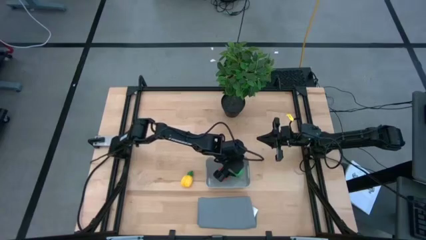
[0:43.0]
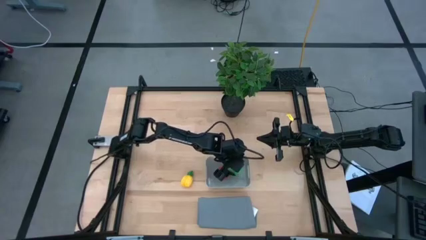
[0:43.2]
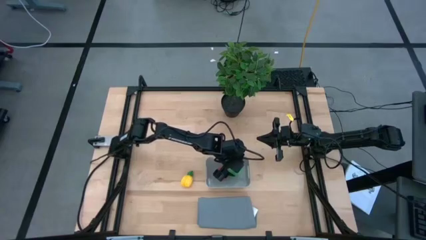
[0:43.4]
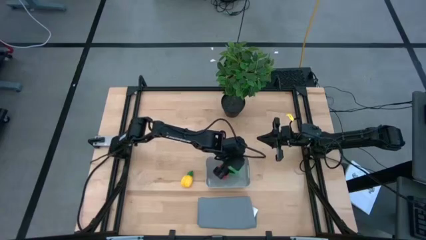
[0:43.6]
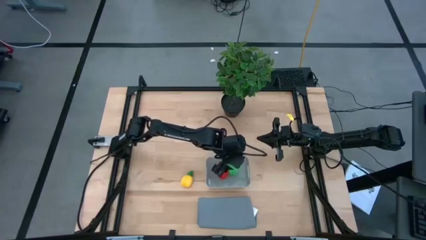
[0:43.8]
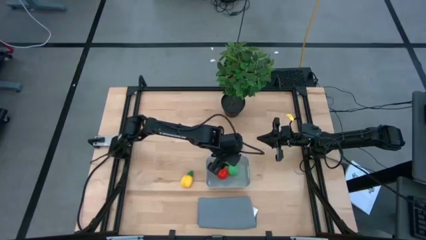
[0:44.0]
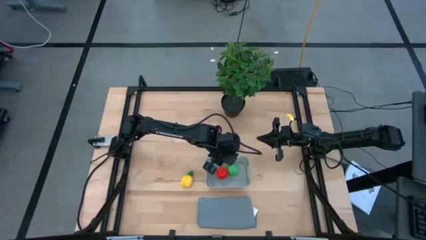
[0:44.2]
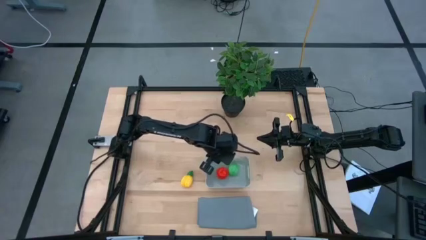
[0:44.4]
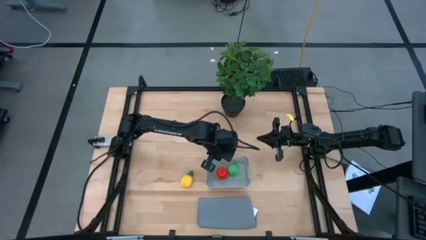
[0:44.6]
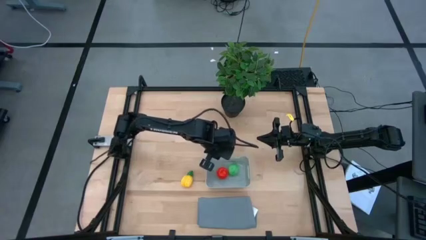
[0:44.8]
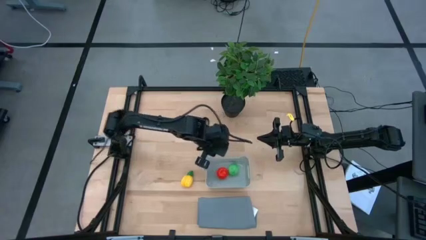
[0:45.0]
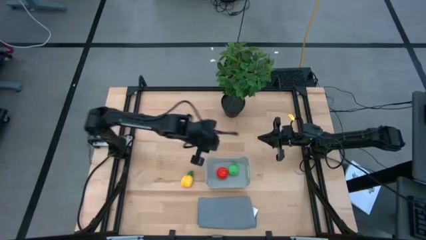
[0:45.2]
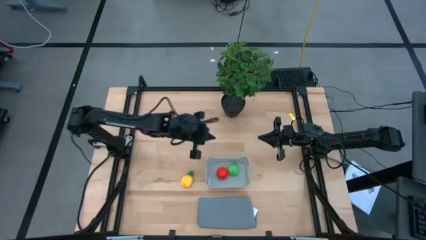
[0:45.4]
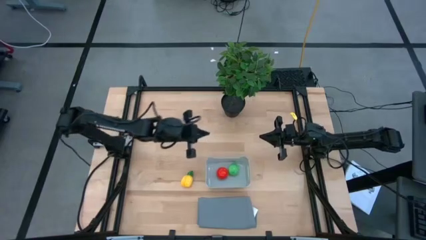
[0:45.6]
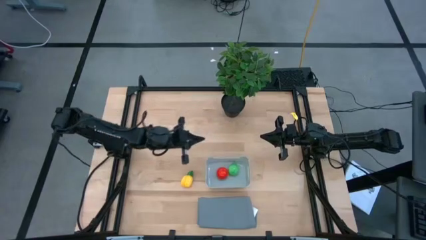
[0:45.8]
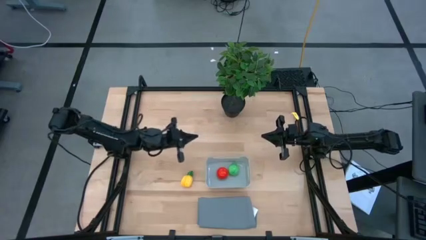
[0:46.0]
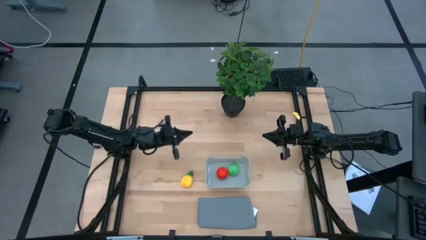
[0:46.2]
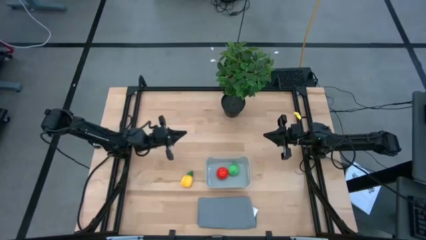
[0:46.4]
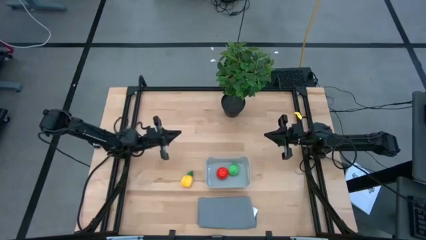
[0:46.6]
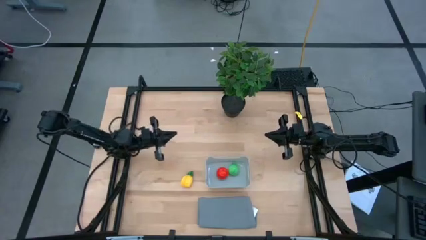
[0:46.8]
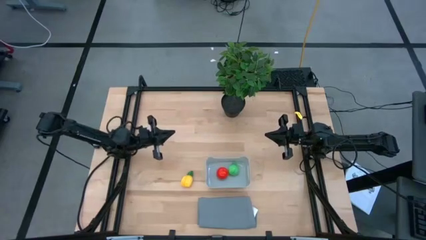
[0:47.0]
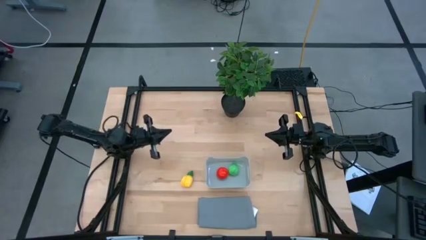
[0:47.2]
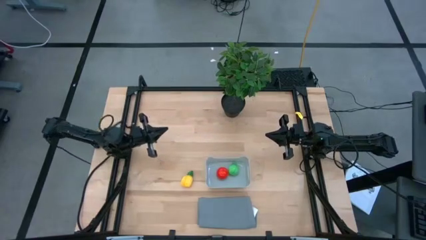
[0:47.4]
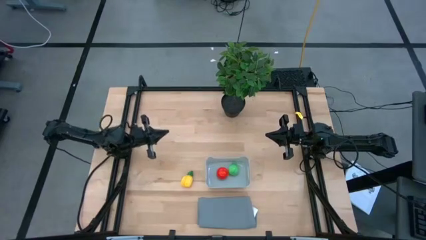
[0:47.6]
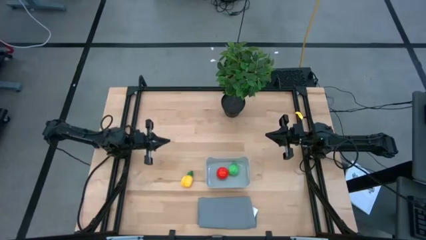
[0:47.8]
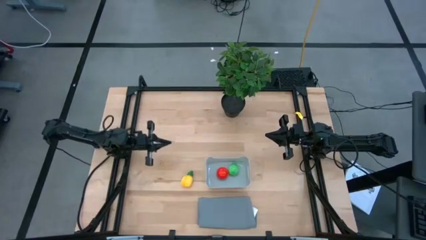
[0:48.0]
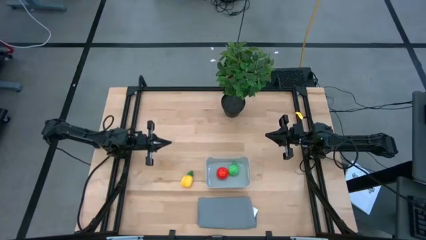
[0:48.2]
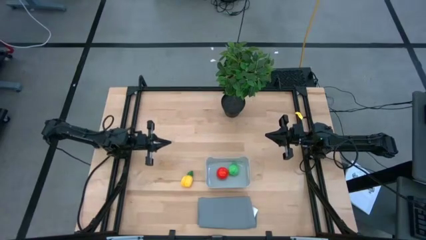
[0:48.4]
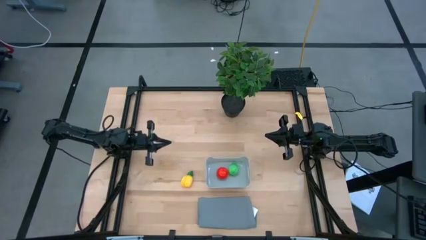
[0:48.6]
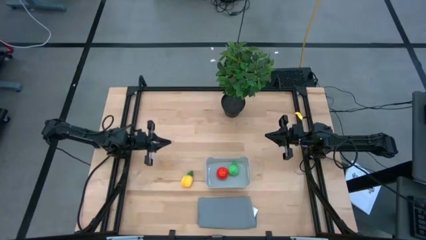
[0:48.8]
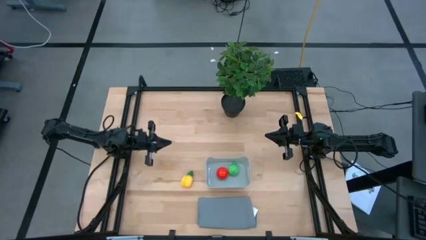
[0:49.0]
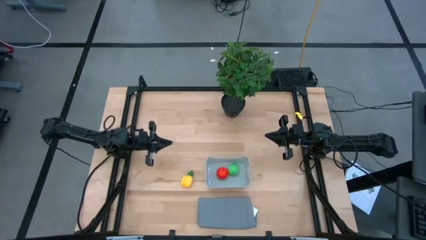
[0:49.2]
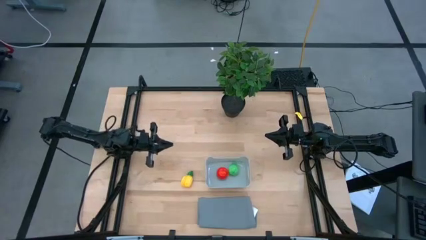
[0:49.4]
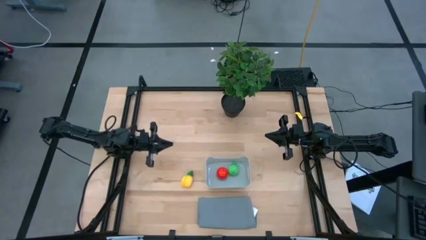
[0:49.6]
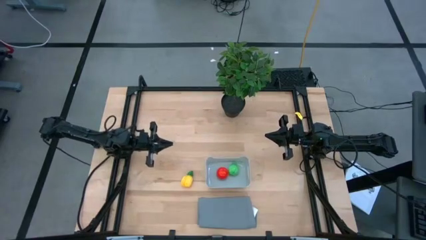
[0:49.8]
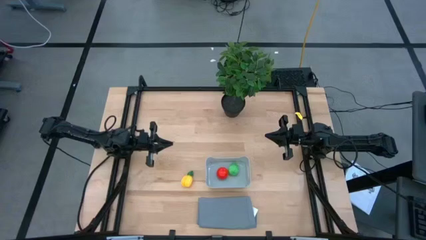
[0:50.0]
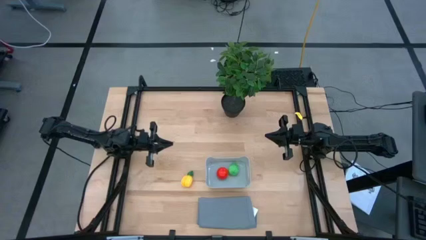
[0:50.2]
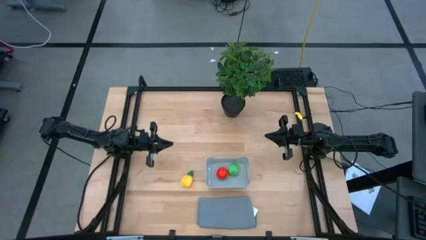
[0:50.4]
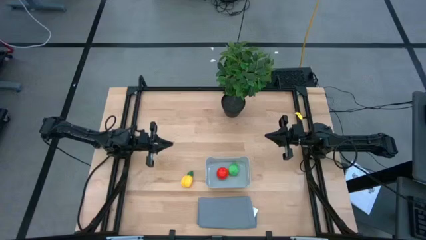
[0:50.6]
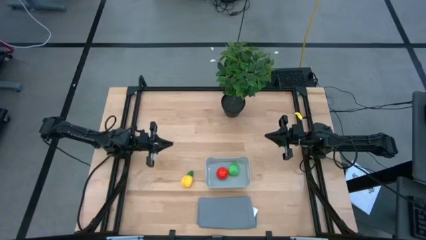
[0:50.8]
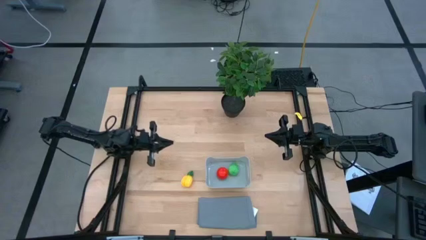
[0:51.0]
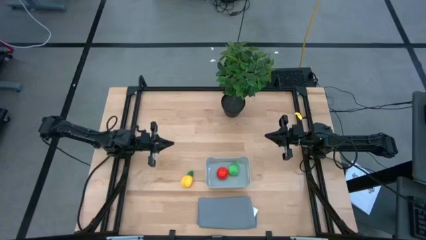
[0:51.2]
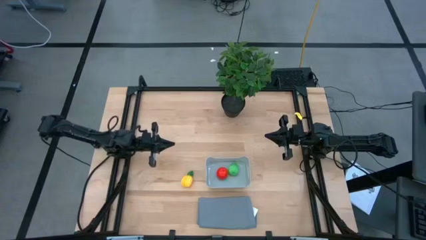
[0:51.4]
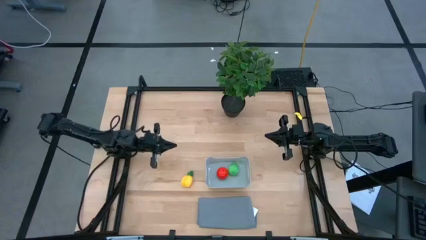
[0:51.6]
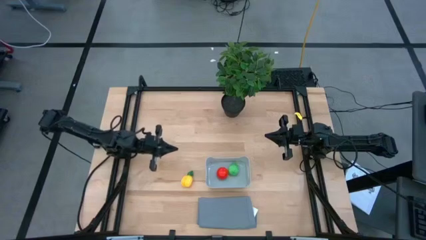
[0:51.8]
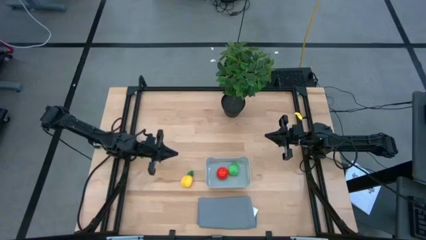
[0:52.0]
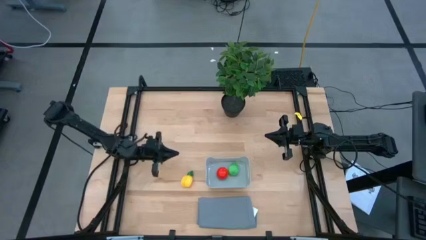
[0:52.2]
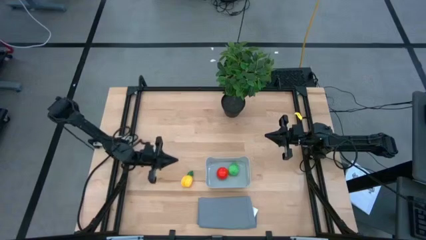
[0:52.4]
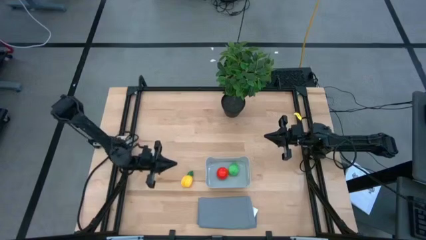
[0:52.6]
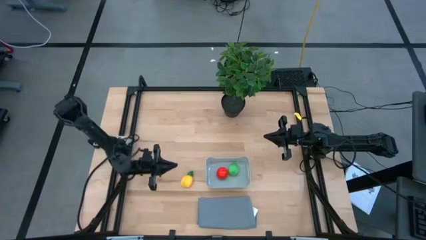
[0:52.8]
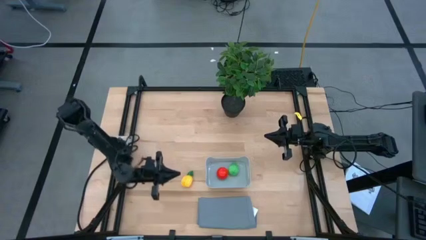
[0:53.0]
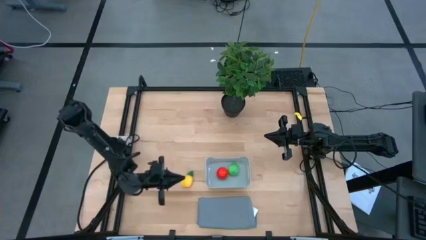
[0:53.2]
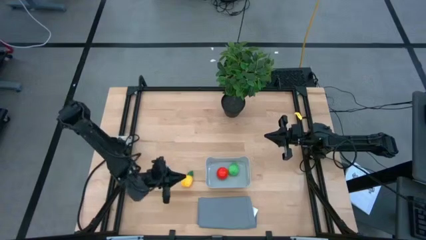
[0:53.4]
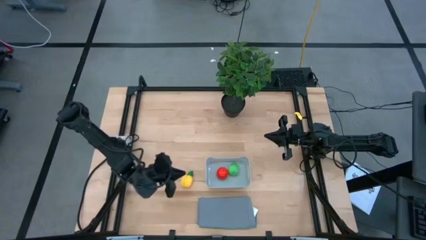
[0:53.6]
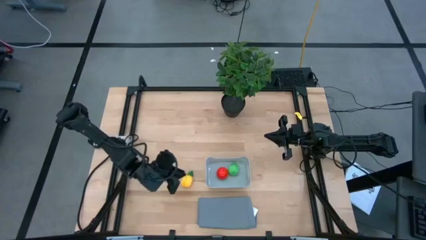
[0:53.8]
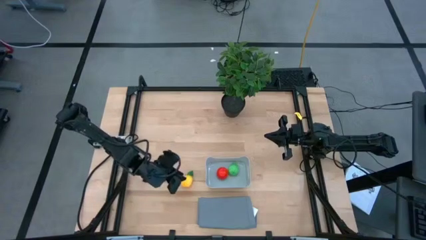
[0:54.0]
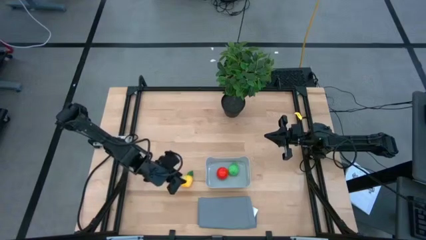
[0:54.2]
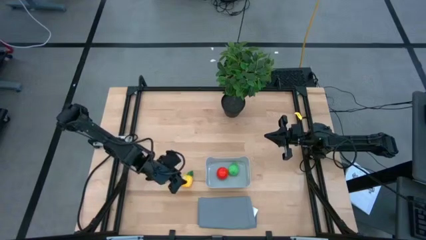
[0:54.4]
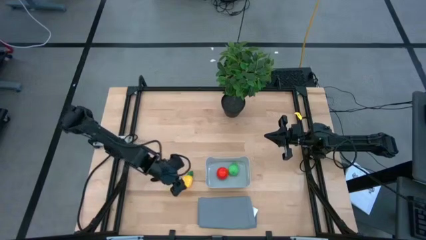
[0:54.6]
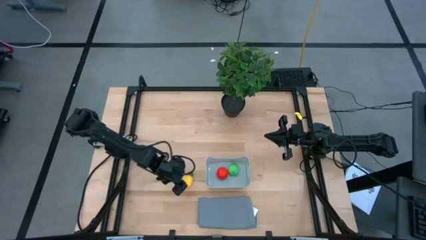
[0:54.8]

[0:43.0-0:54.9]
Task: Pick and placing Produce into tupperware
Put the pineapple into the gray bin

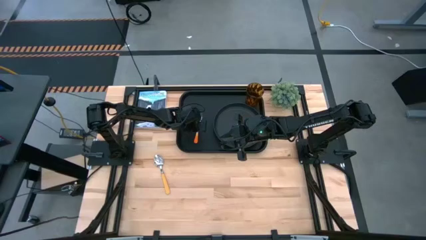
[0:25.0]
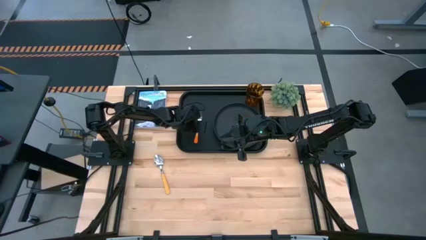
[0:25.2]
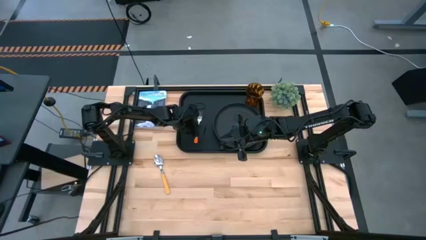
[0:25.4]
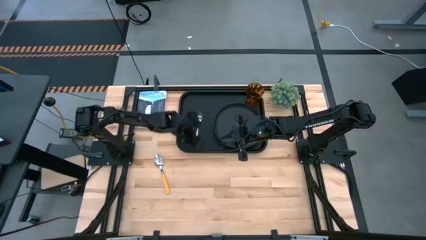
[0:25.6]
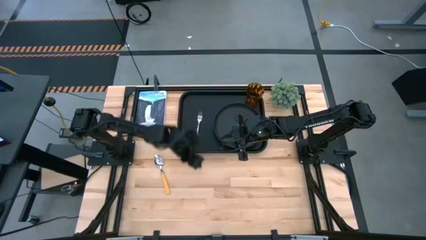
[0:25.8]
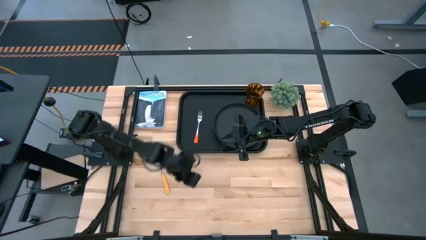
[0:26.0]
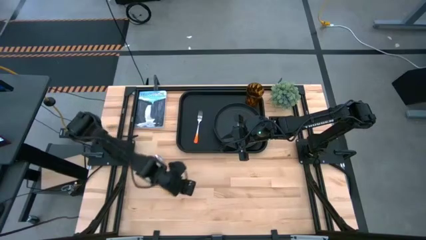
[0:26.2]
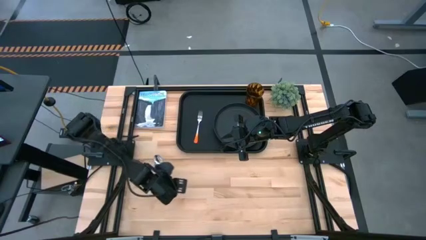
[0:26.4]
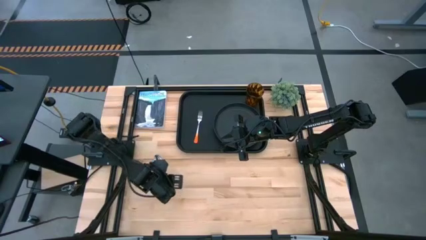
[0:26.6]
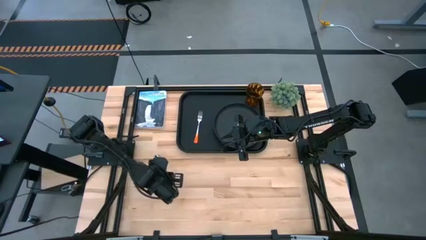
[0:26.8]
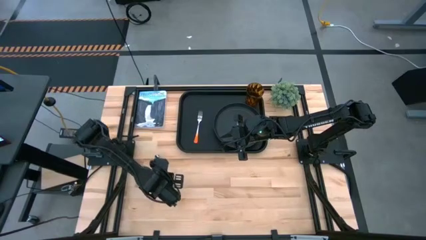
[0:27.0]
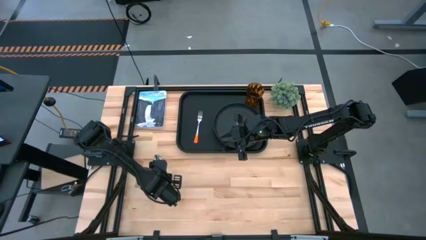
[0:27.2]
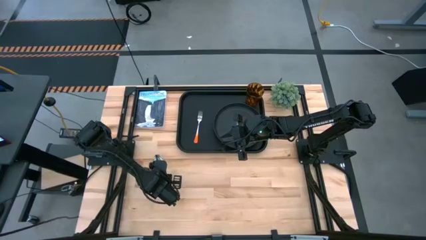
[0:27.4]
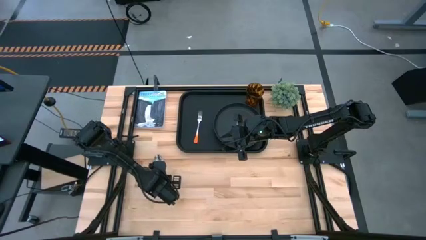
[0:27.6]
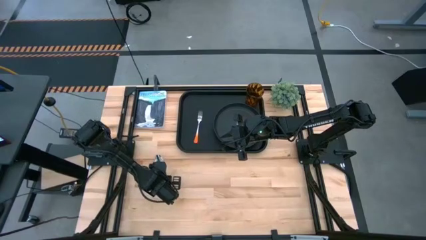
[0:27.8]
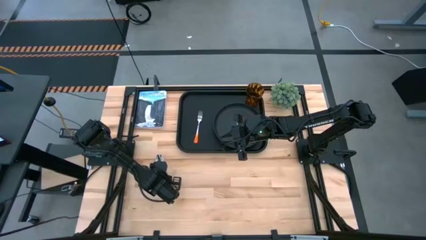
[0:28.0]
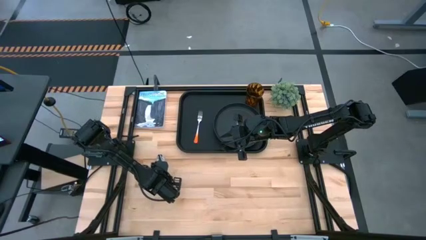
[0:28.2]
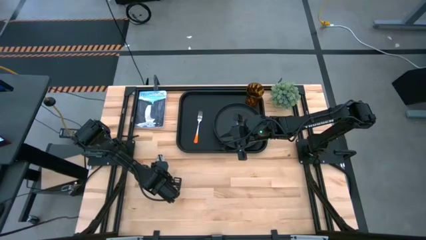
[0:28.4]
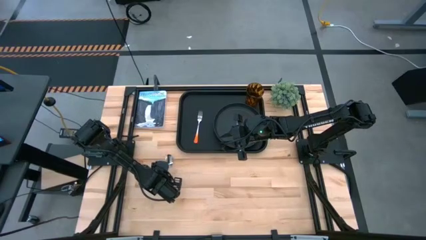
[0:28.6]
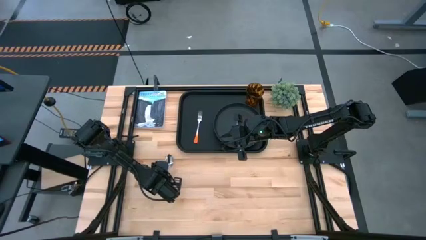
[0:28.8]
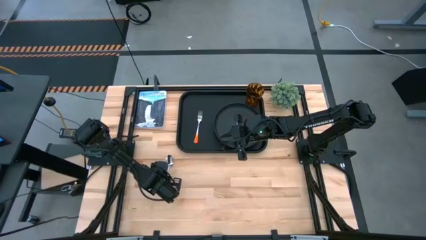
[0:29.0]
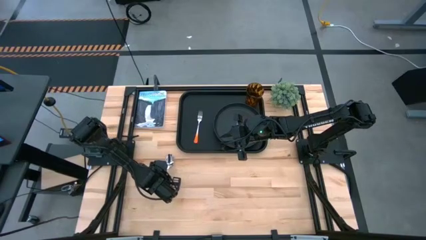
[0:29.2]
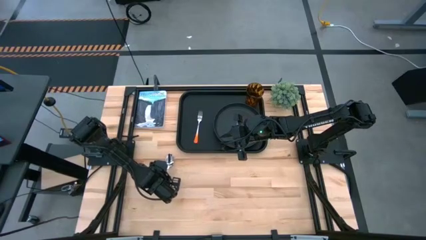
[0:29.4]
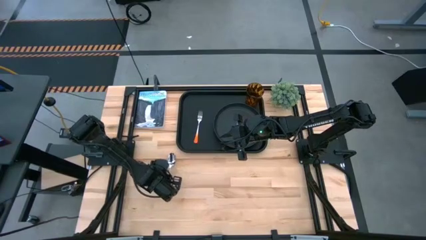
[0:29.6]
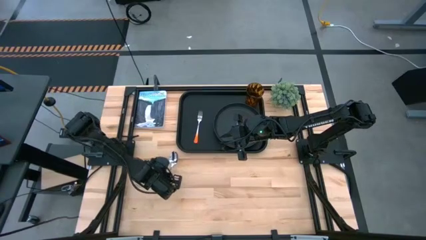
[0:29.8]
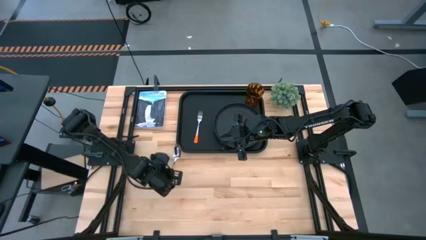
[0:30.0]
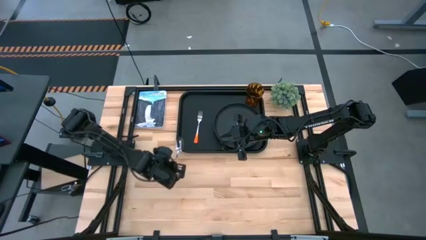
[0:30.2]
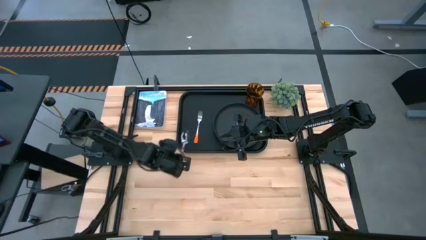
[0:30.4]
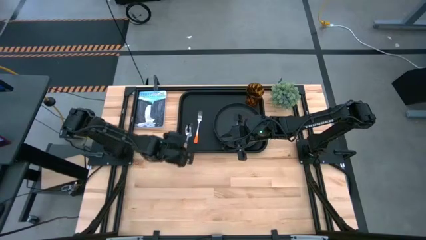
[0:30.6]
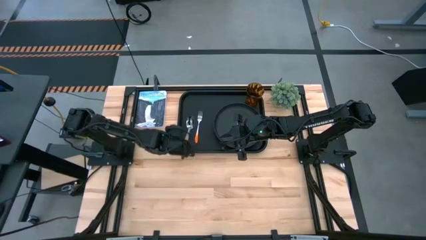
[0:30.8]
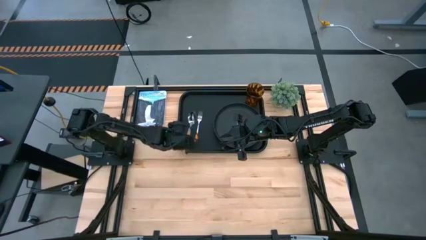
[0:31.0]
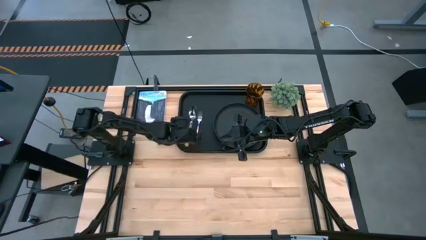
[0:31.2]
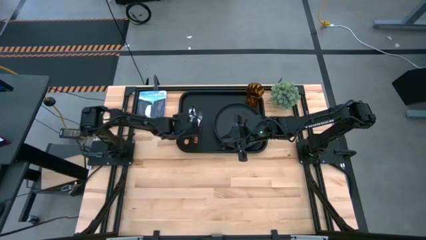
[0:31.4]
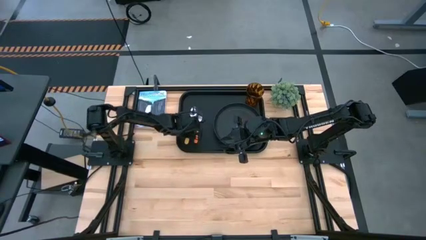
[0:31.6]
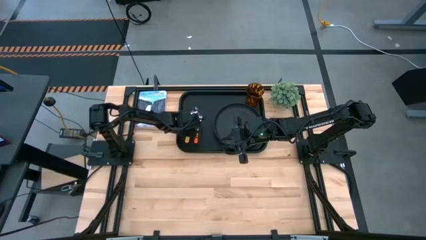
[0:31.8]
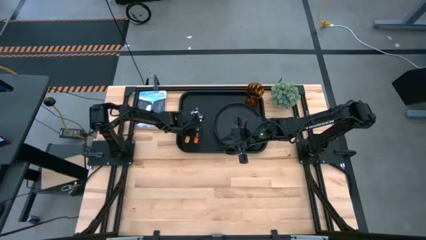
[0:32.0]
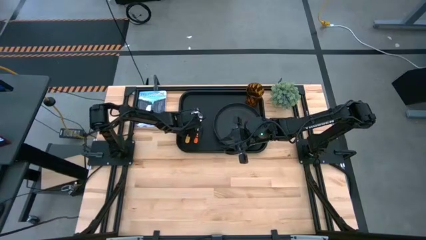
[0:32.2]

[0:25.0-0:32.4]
Task: Pick and place plate/cup/fork/spoon on tray
Put the yellow spoon on the black tray to the left of the orange fork
